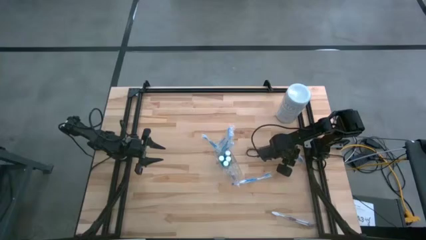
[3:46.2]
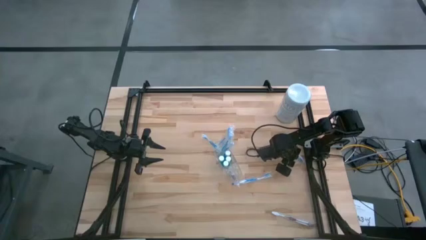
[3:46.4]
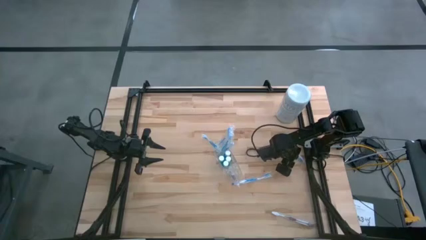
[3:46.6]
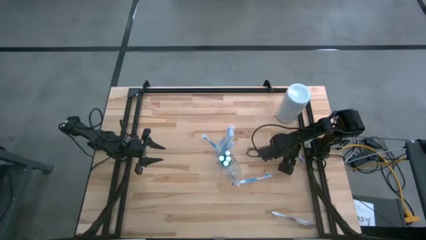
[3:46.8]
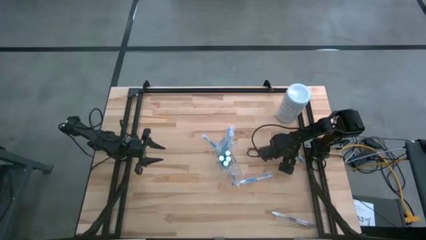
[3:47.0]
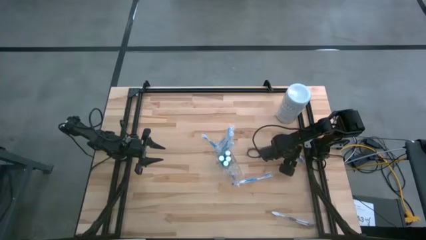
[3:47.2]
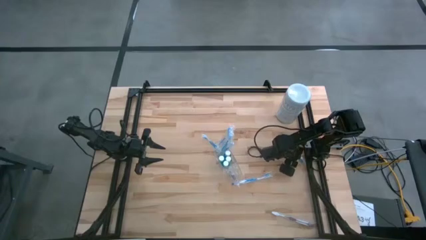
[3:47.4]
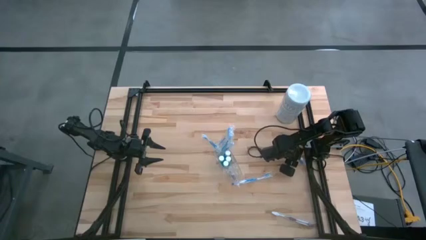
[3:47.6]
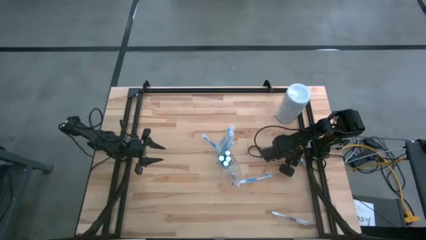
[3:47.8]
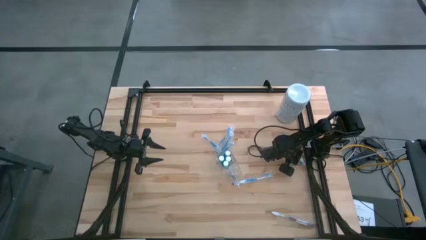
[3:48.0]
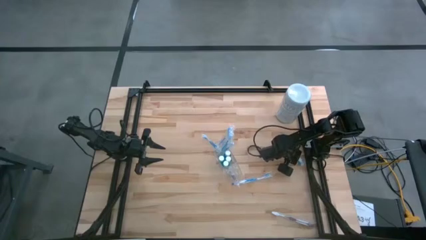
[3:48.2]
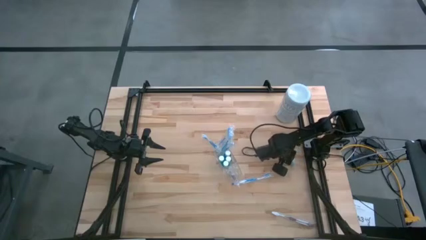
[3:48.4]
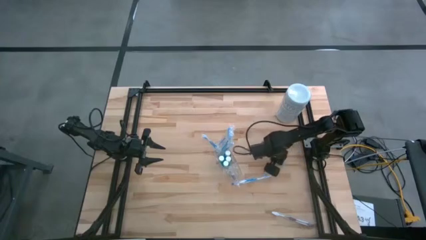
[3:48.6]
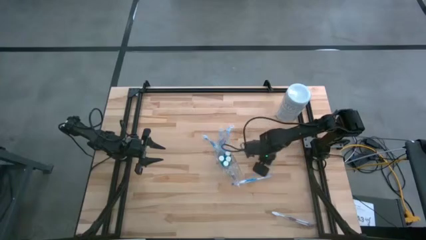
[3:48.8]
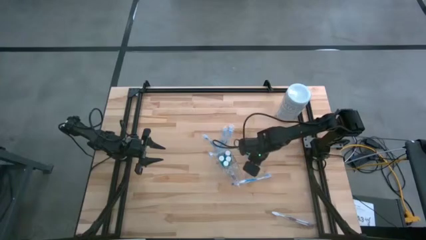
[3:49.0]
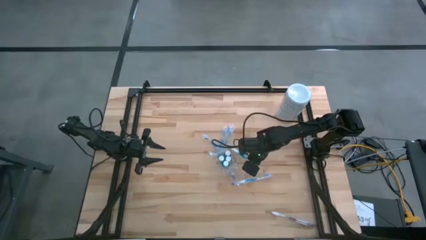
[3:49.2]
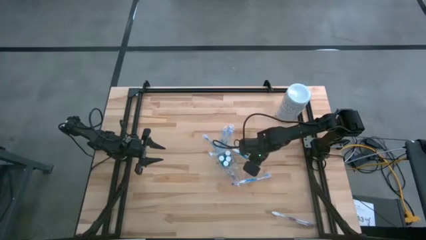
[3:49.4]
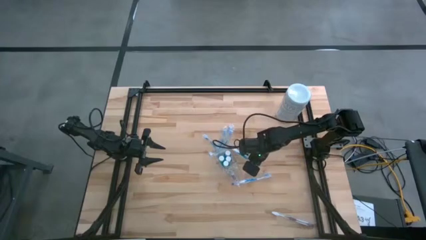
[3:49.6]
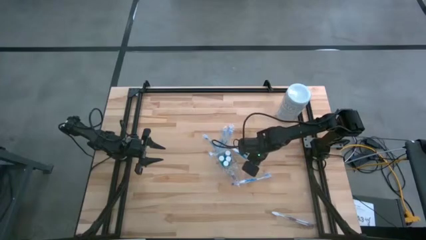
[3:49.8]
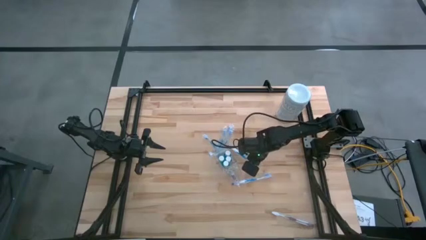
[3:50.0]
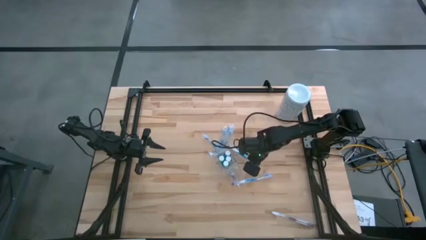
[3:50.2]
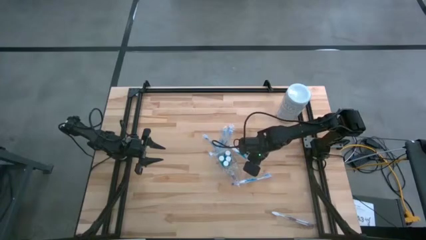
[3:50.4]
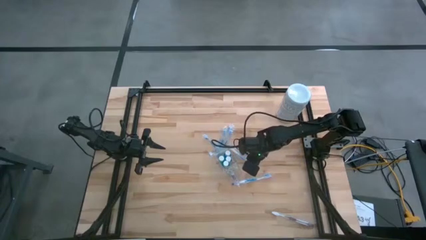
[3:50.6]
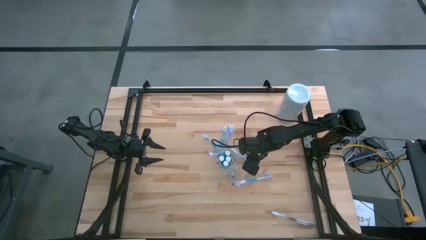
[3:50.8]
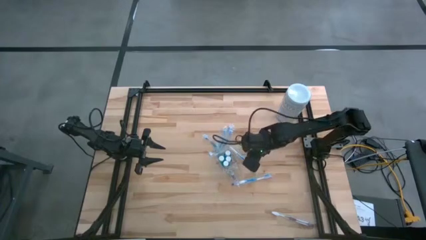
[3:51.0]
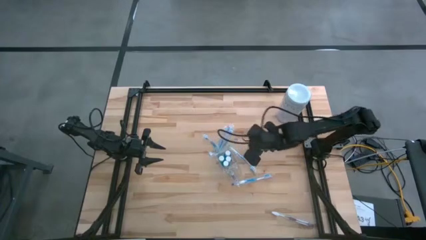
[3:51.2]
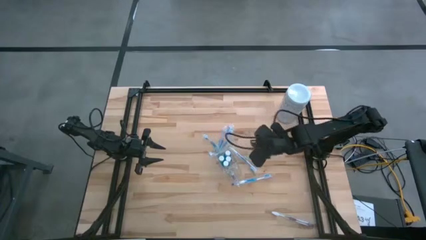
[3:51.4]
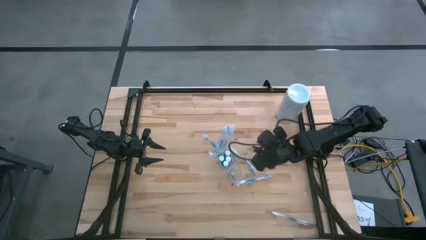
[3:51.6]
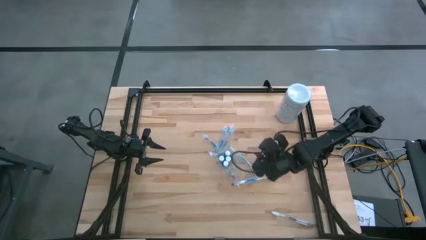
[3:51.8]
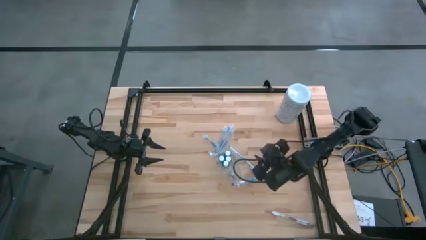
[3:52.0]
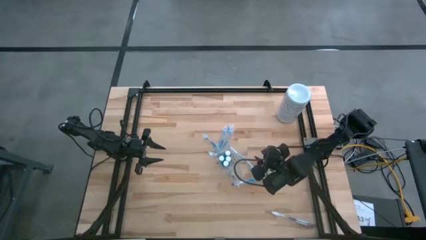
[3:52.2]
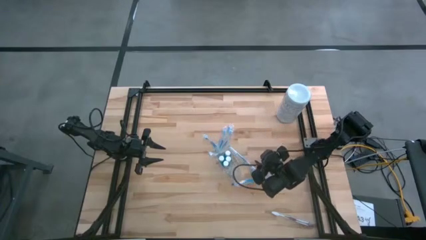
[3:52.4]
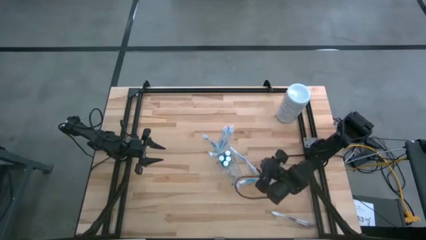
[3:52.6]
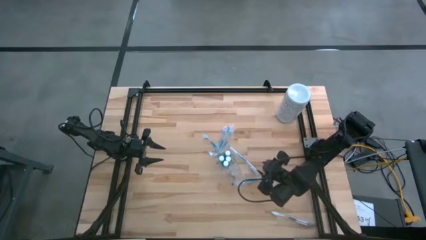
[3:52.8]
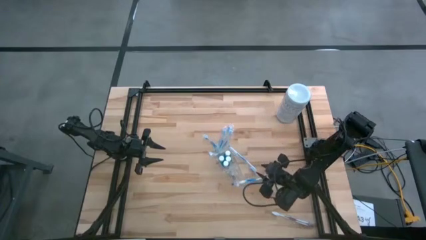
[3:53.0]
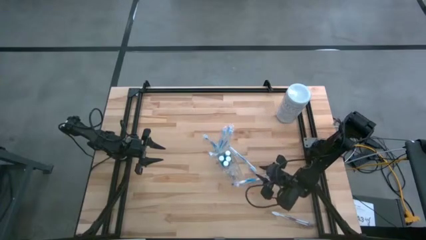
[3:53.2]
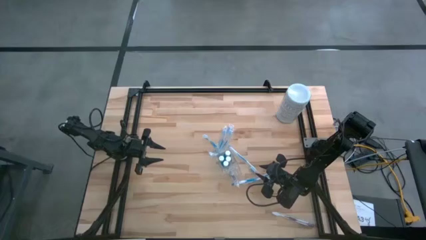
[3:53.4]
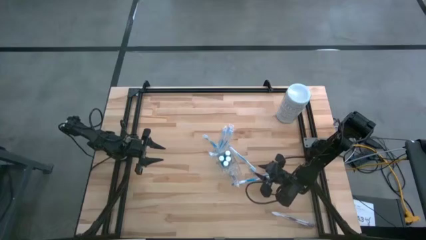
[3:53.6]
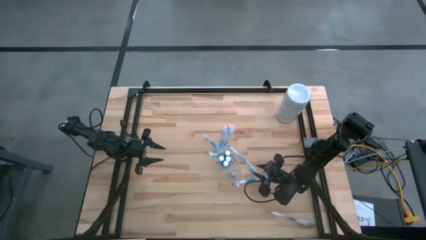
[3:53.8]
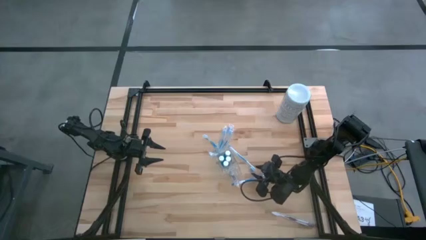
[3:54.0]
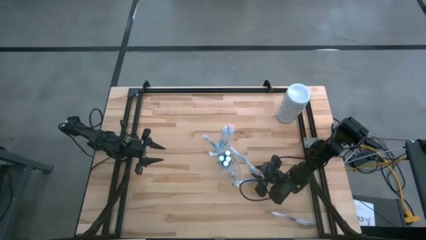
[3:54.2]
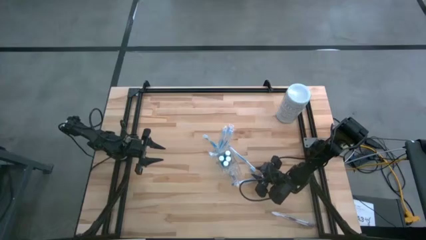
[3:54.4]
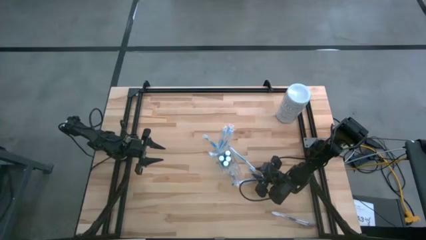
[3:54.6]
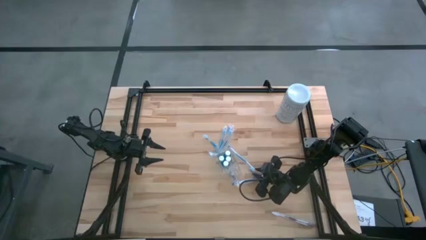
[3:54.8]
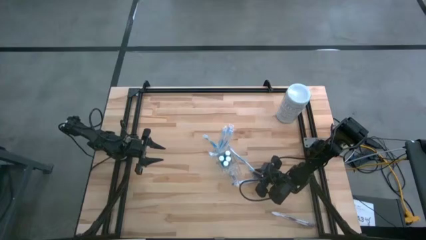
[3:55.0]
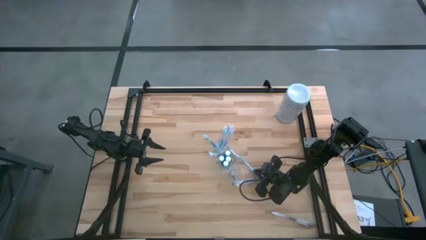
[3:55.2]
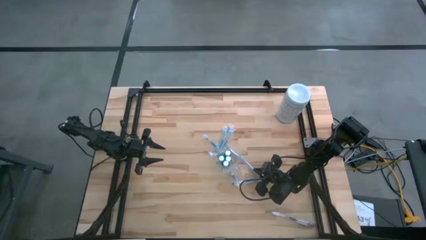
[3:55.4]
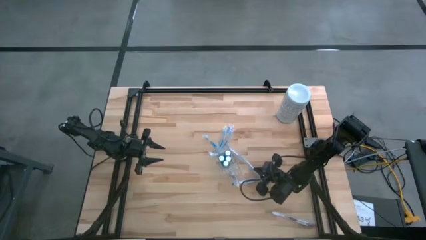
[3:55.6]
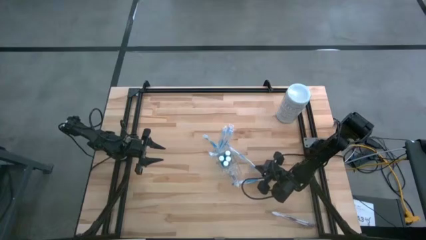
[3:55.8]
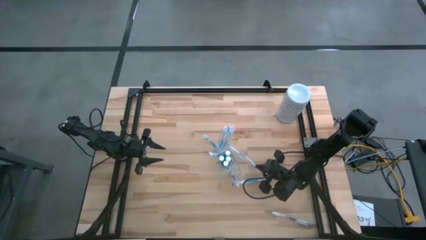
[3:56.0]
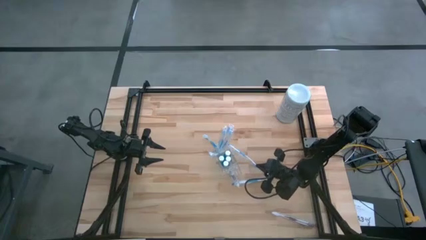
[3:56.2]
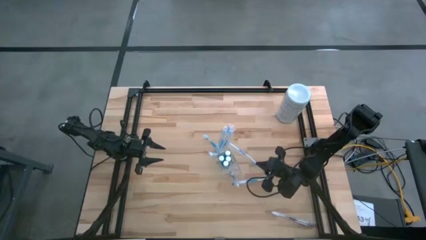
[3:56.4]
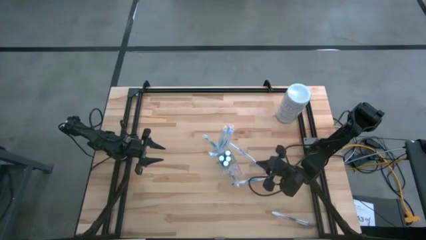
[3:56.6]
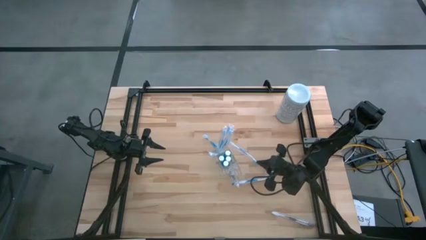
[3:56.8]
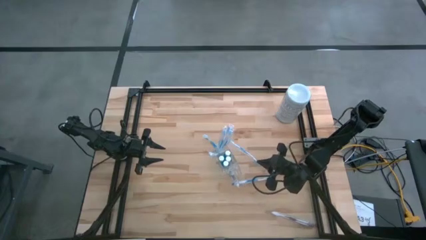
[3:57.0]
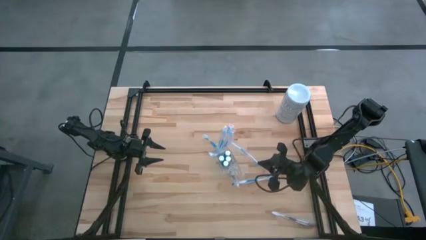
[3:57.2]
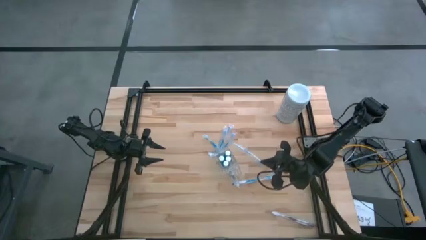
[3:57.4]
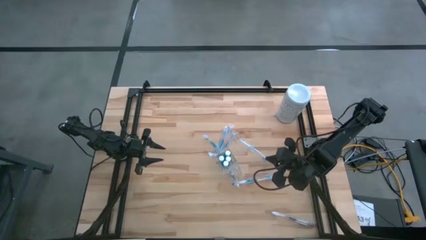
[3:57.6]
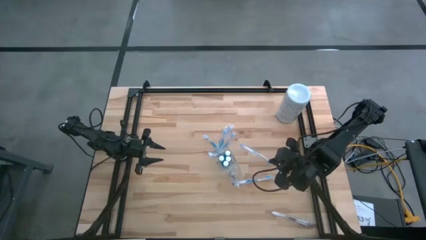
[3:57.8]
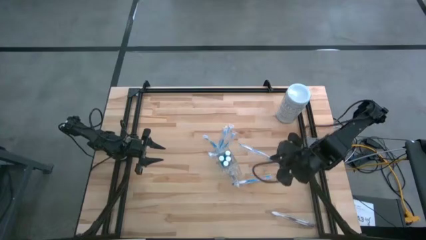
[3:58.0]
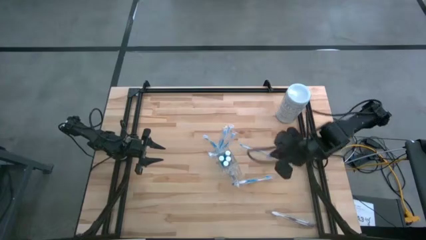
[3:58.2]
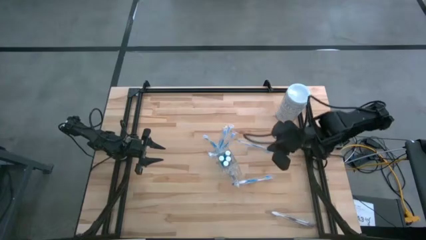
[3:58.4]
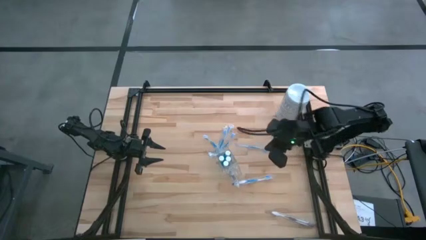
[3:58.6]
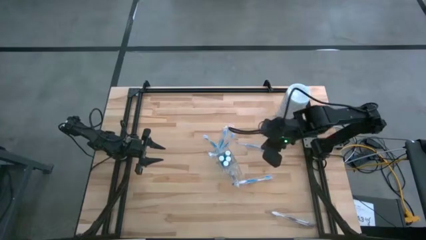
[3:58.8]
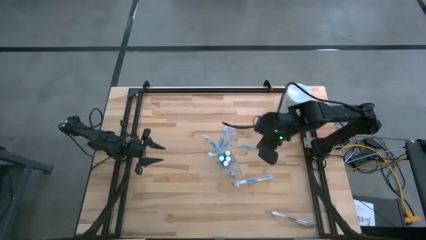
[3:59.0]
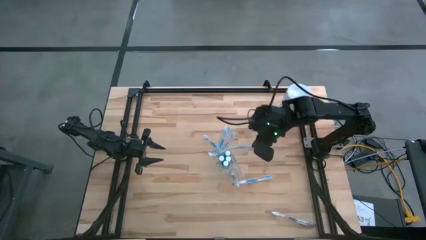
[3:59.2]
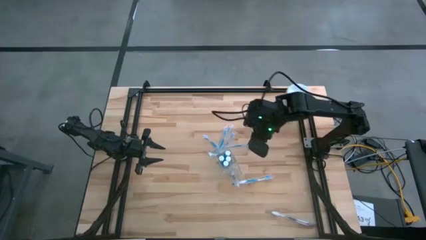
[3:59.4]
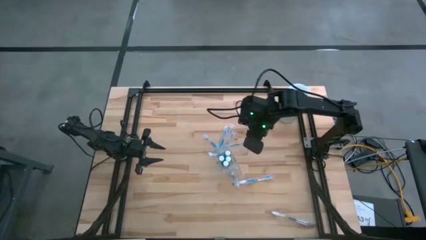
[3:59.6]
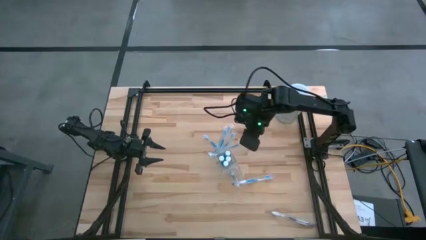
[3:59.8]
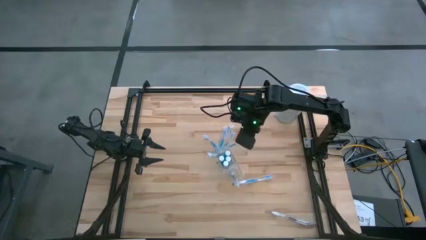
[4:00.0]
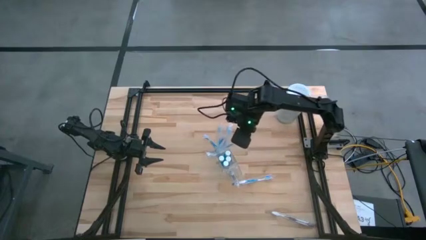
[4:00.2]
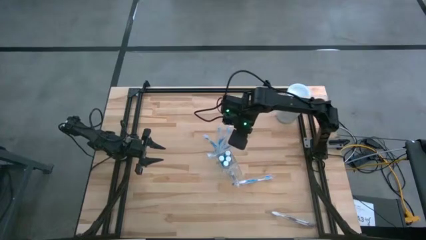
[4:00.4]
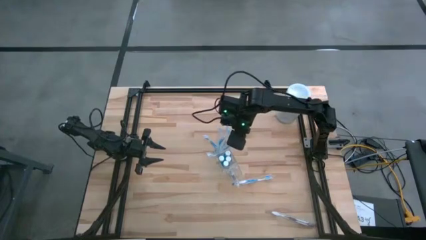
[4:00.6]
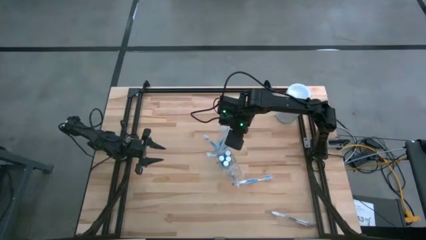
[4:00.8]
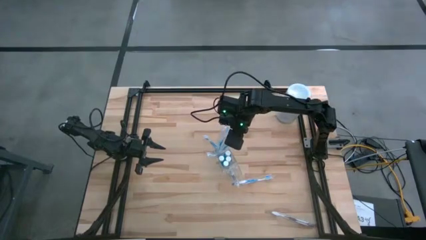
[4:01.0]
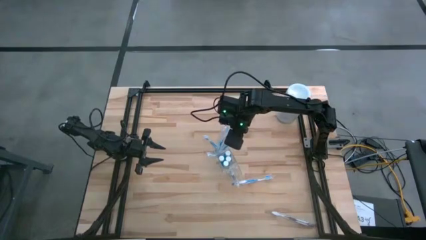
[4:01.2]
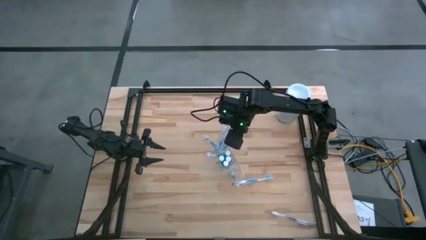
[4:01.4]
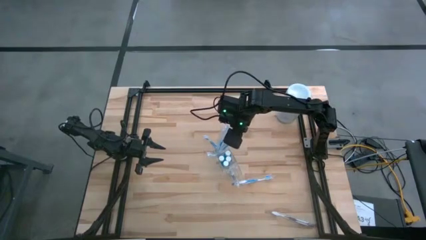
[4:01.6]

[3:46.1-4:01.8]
Task: Pick & Place toothbrushing station
Put the blue toothbrush into the left section of the transparent organizer
